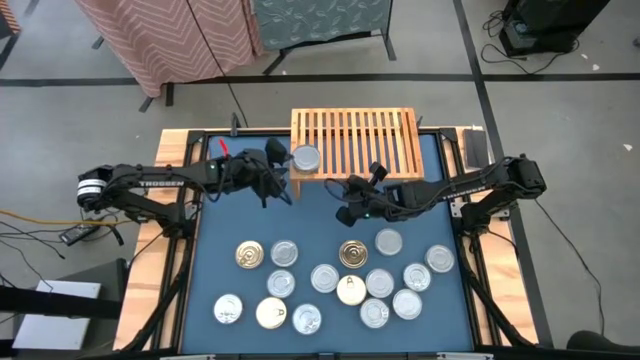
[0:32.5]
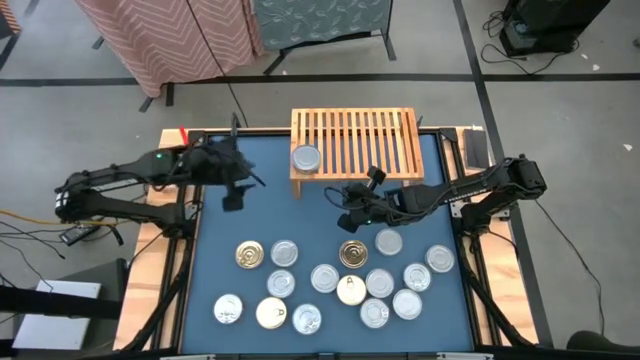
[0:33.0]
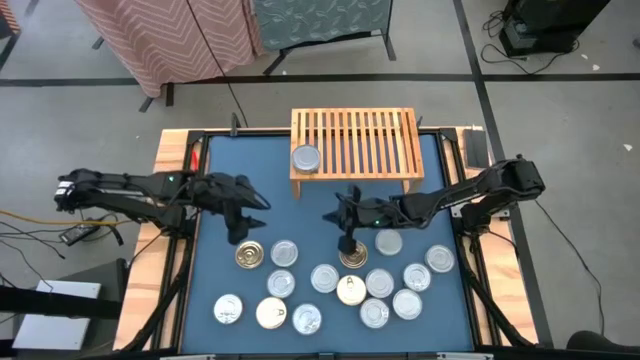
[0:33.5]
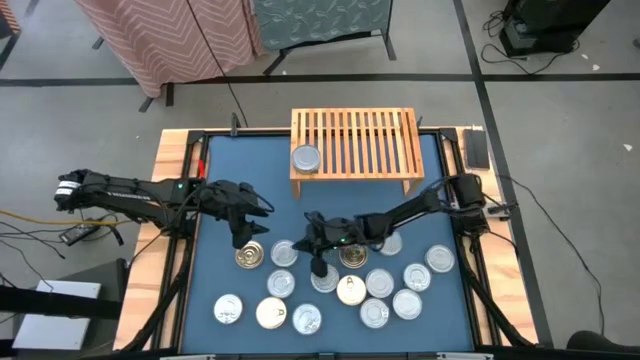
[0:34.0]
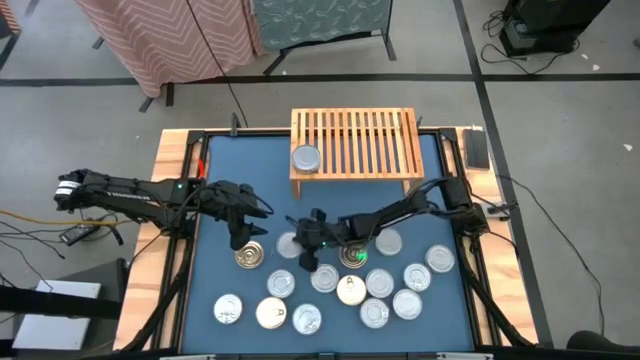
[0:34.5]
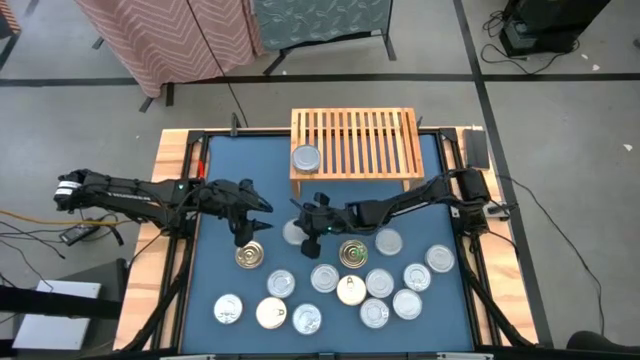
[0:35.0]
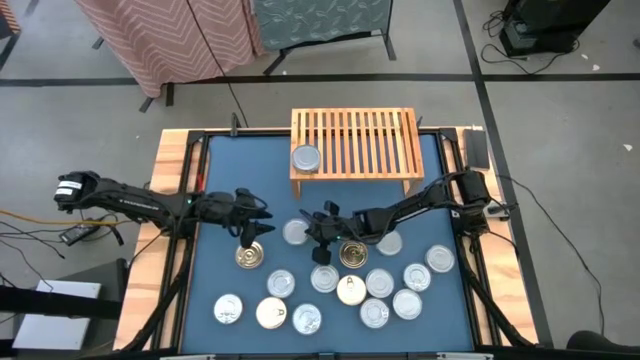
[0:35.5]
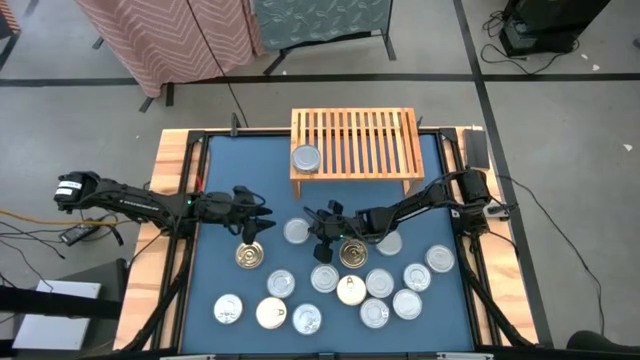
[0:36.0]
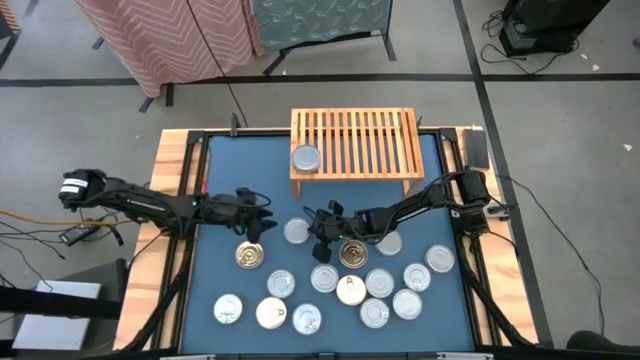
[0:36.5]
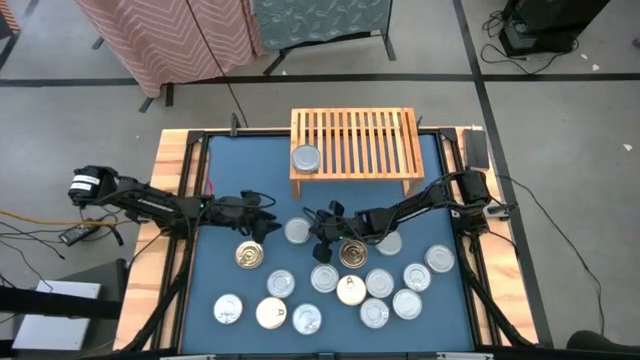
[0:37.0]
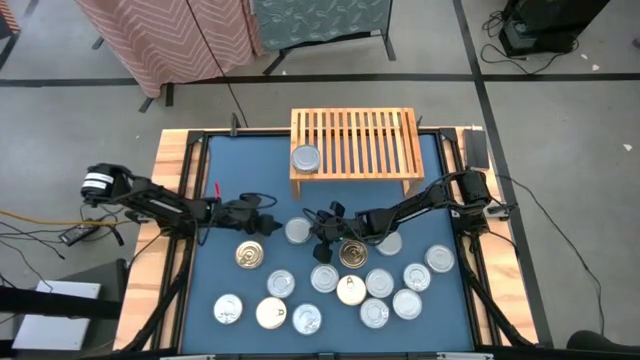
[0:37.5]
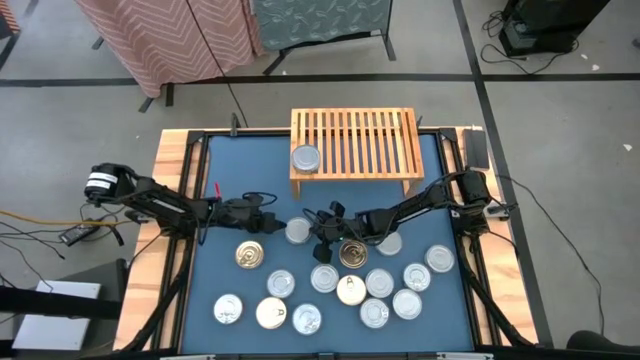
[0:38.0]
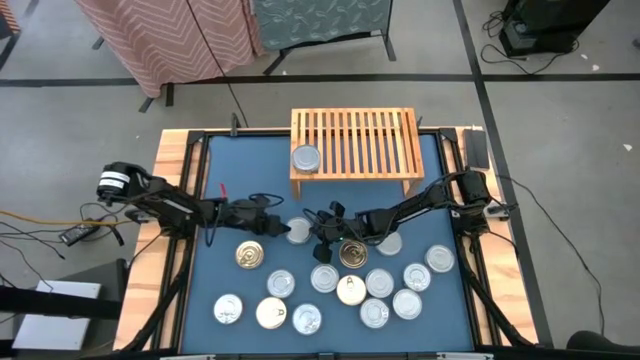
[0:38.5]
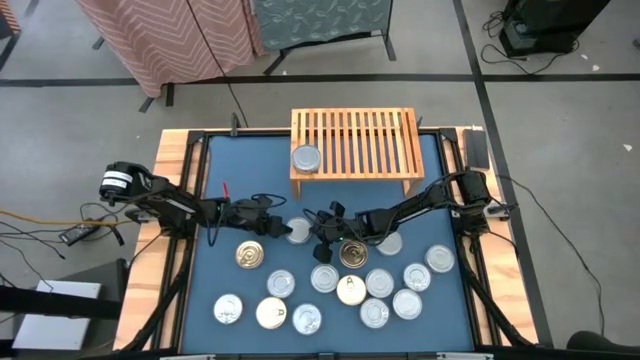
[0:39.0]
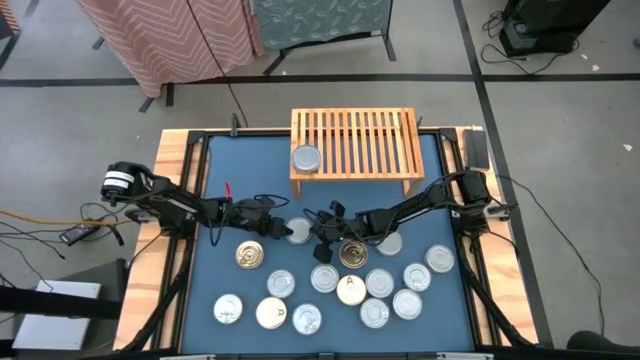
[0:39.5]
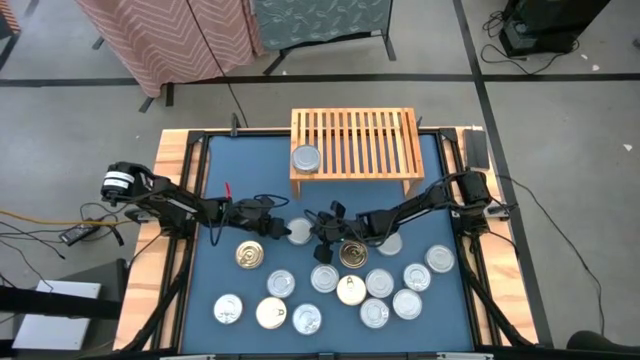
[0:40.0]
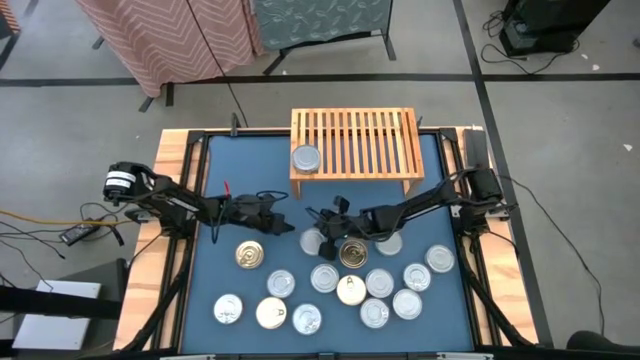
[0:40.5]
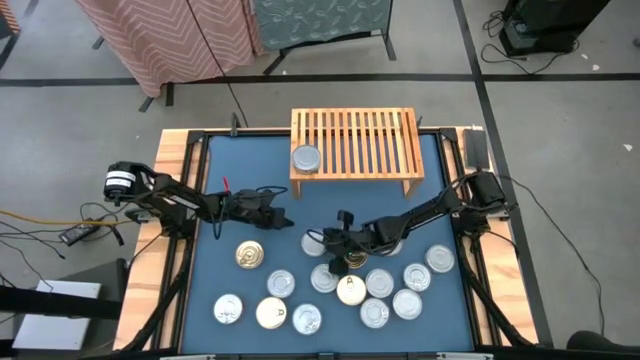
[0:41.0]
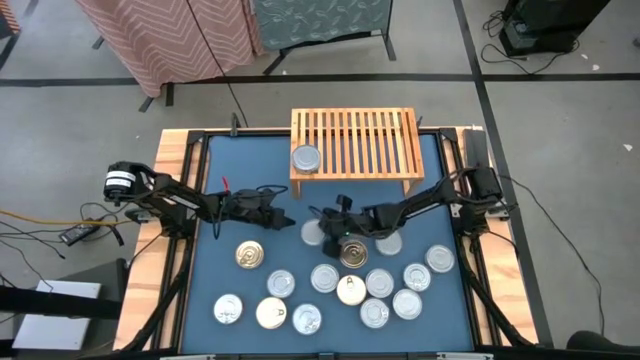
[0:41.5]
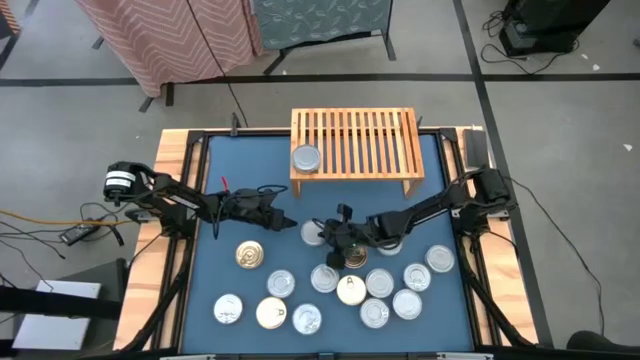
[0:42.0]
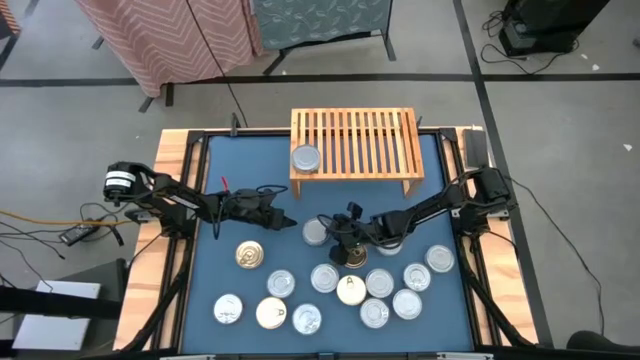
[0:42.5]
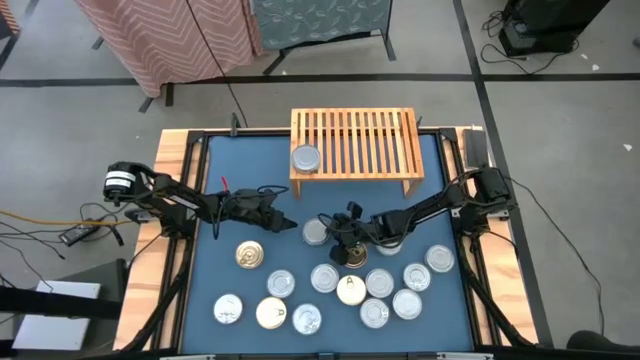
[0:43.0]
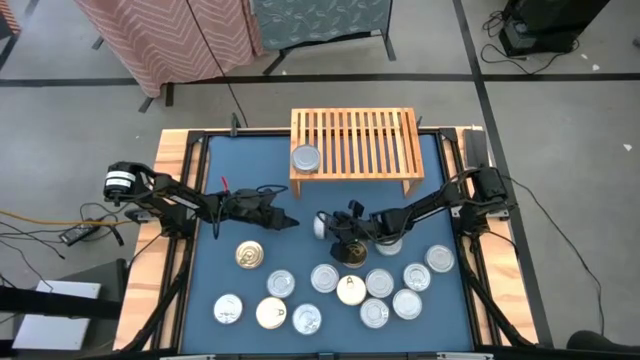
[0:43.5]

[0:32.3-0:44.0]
Task: Stack canned seafood by type on shelf
Stack the green tuna can on top of the green tuna can on the shelf

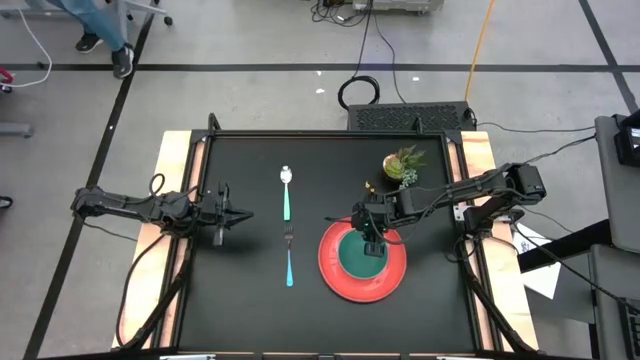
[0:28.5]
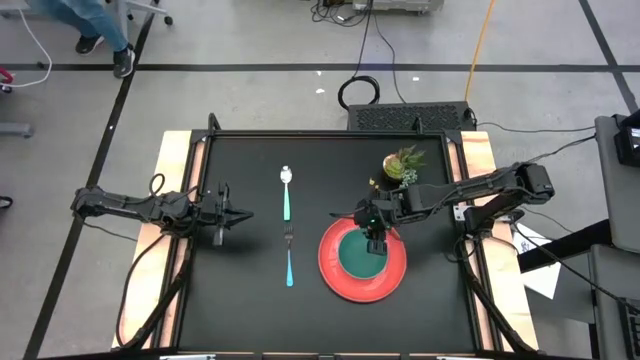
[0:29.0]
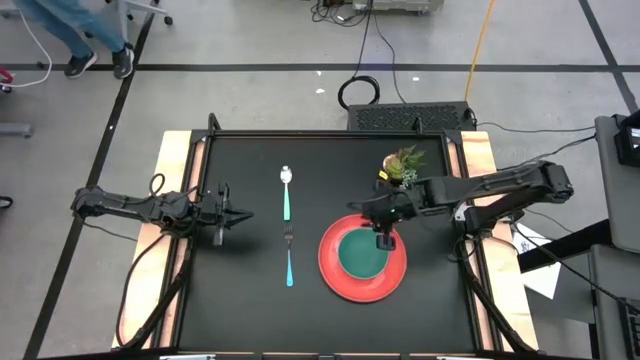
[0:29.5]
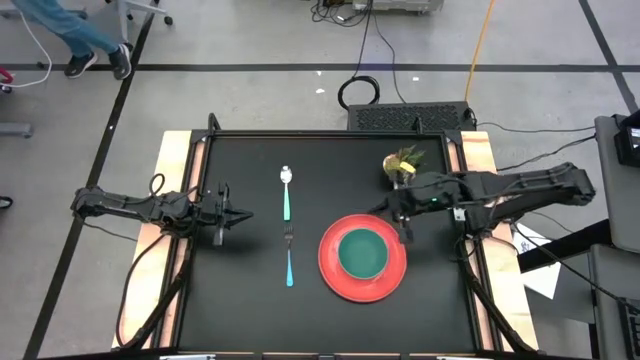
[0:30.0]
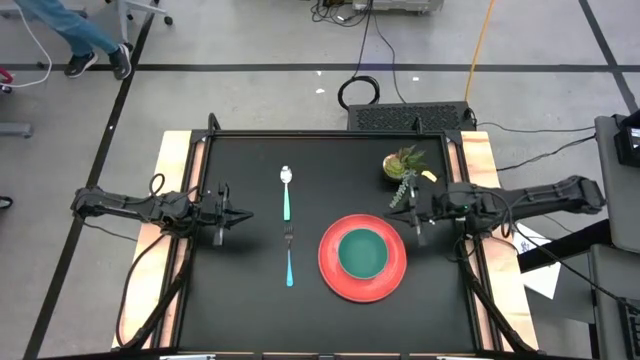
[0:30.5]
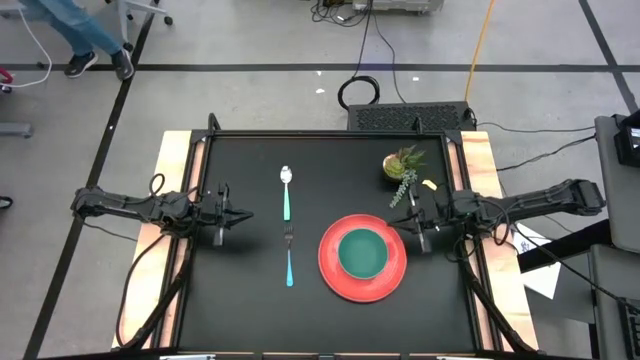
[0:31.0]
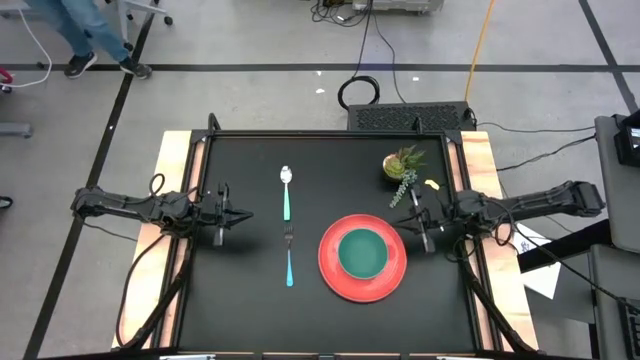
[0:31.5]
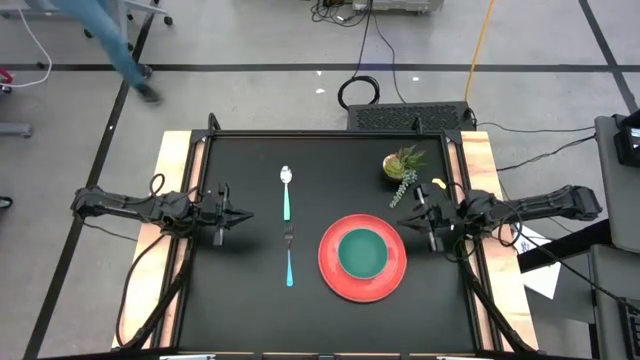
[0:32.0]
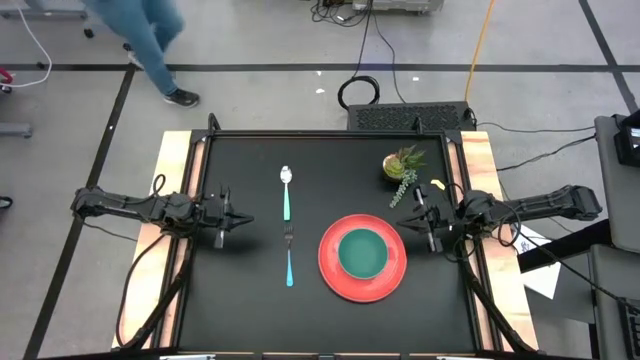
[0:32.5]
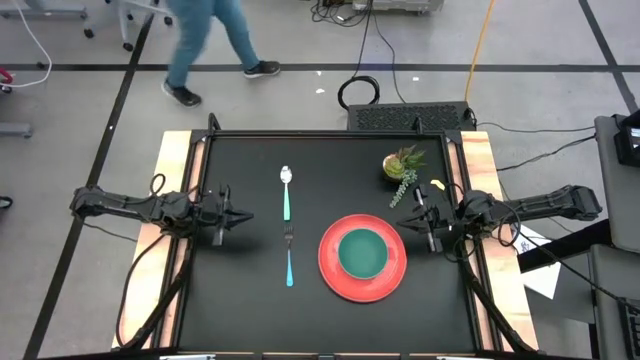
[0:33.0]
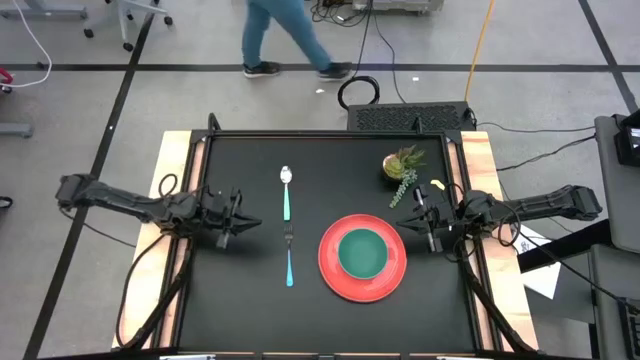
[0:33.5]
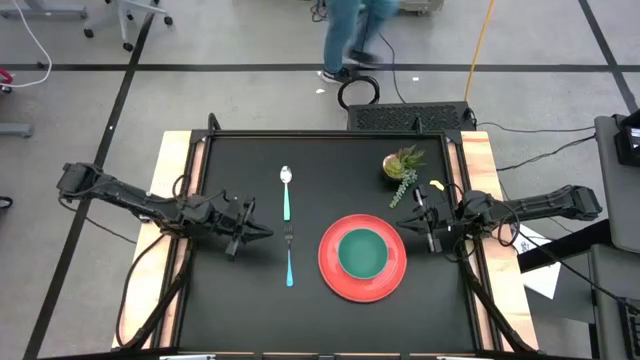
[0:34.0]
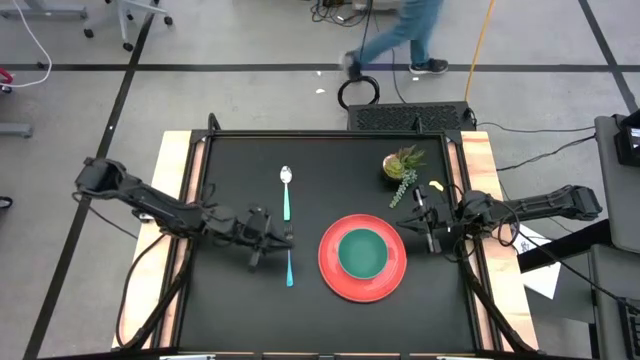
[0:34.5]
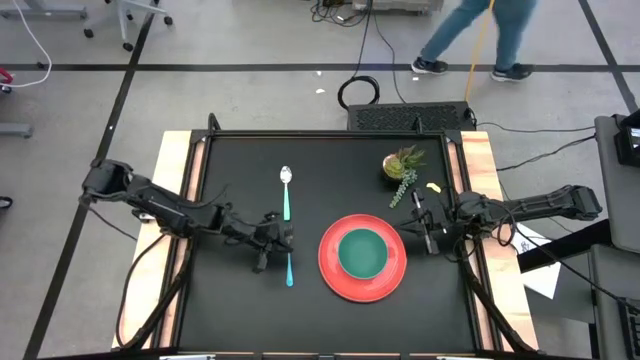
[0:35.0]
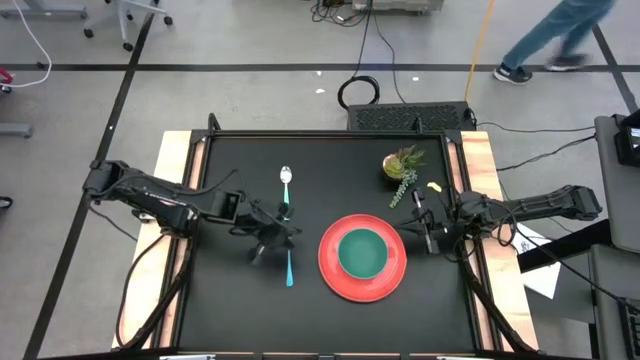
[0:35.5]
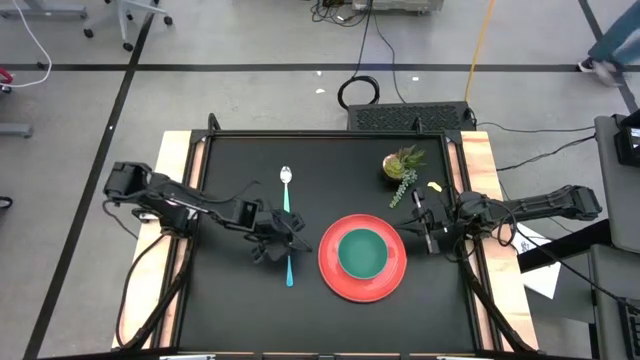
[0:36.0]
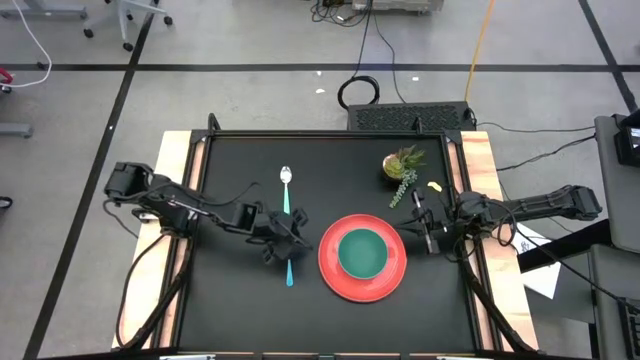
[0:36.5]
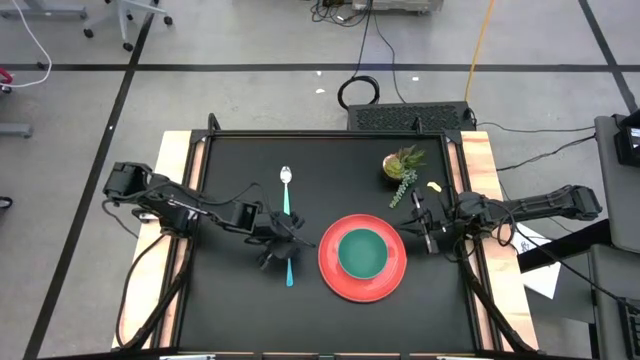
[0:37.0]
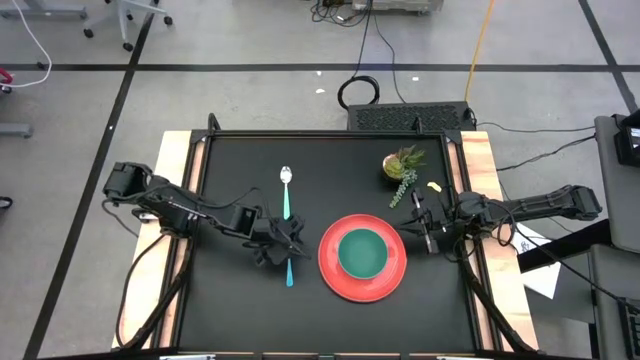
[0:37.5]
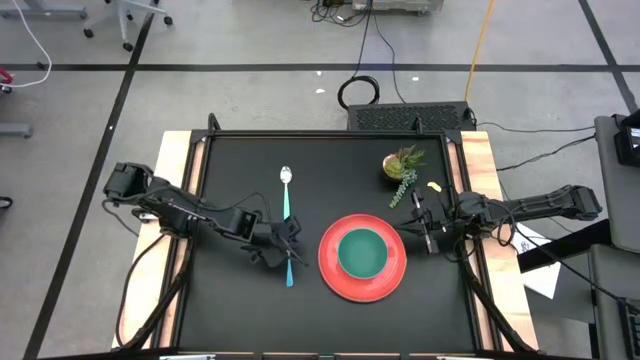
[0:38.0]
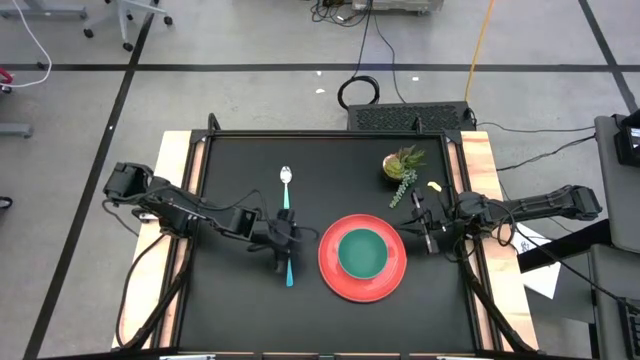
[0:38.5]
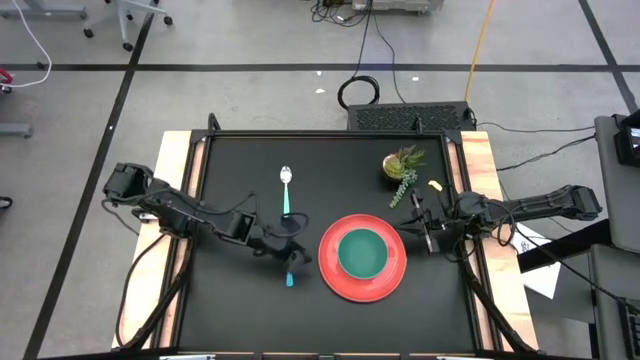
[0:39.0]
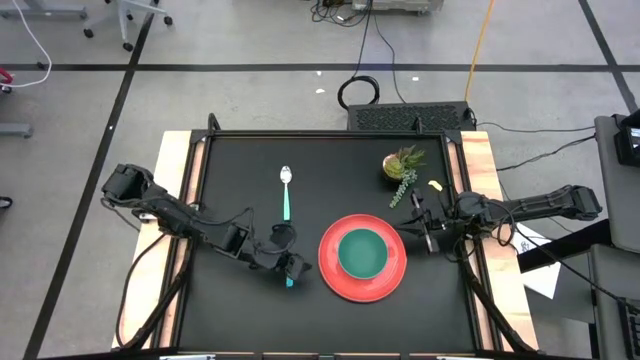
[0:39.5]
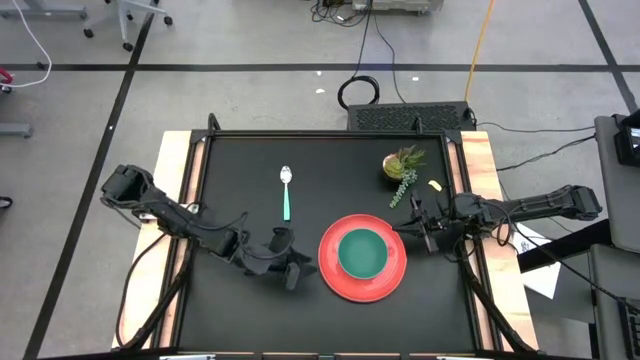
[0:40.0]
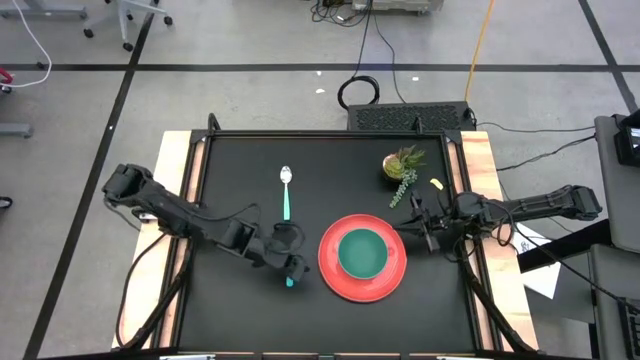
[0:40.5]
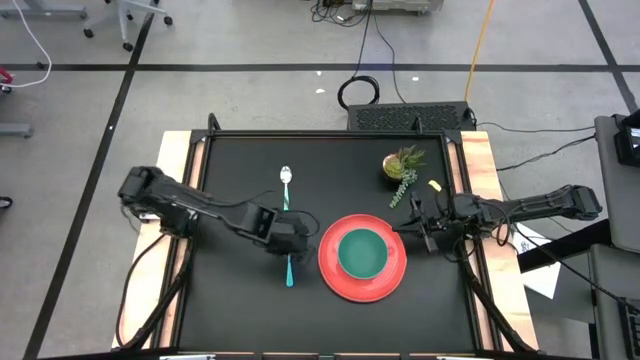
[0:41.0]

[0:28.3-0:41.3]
Task: Set table place
Put the blue fork to the left of the green bowl on the orange plate
